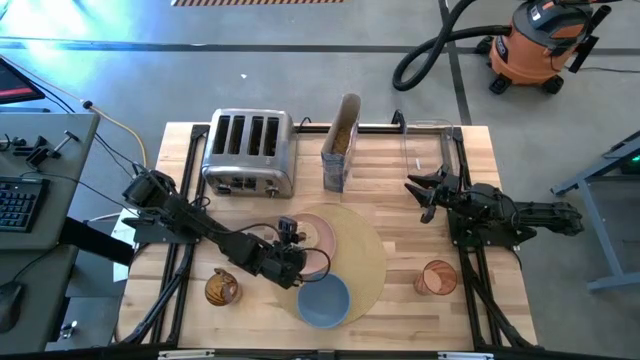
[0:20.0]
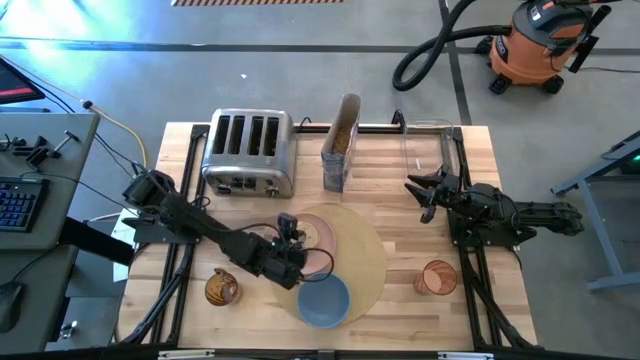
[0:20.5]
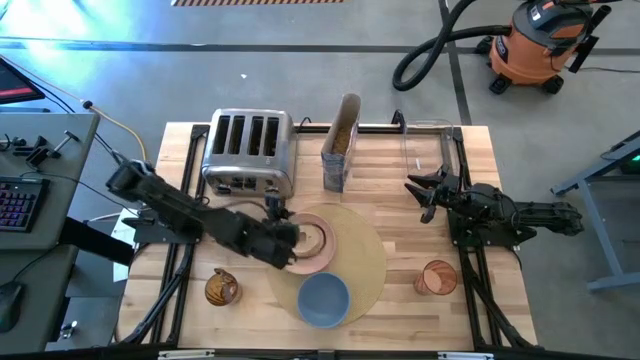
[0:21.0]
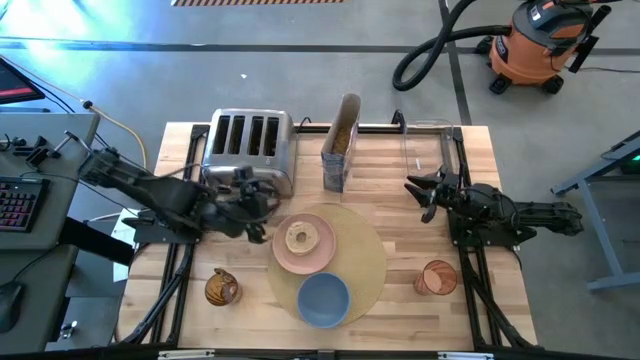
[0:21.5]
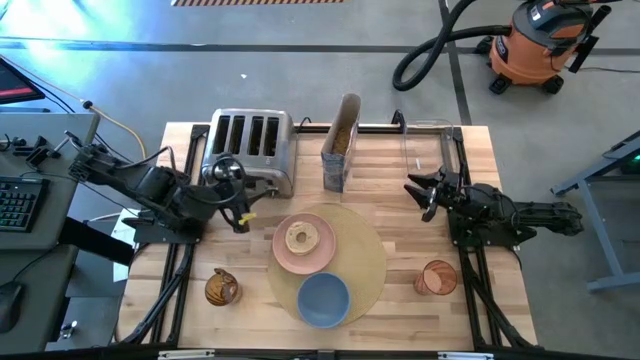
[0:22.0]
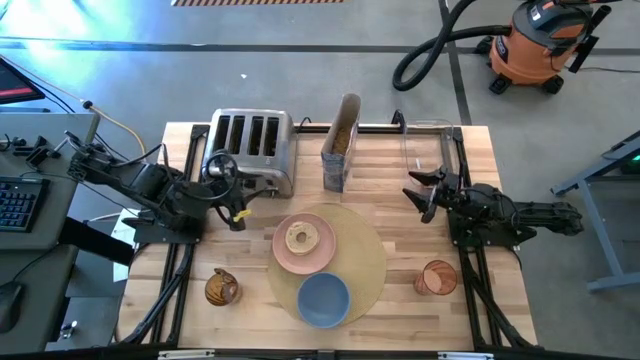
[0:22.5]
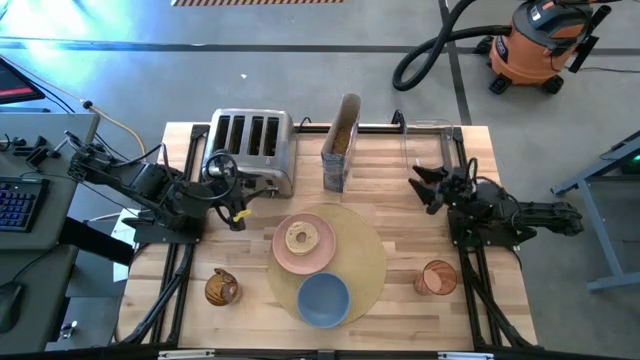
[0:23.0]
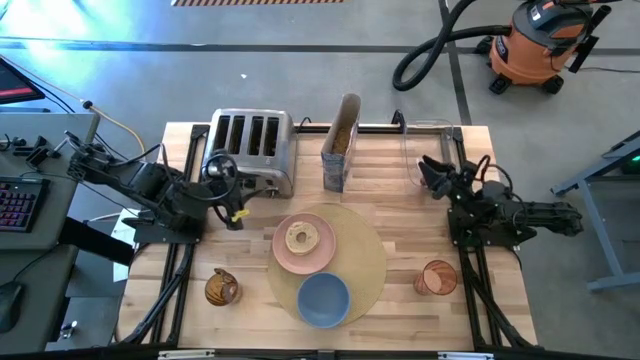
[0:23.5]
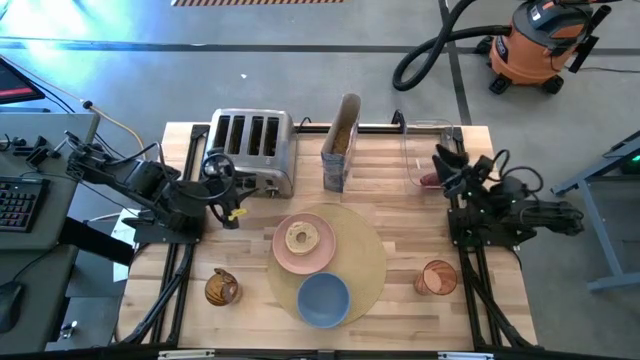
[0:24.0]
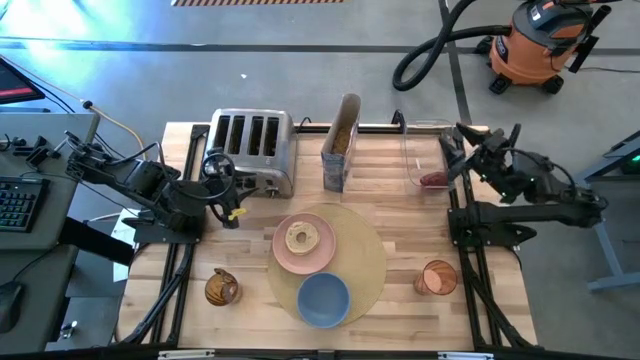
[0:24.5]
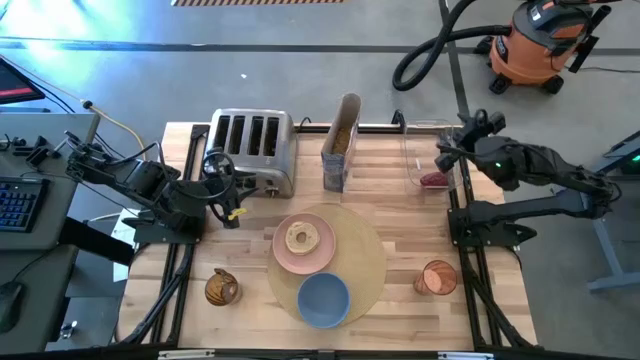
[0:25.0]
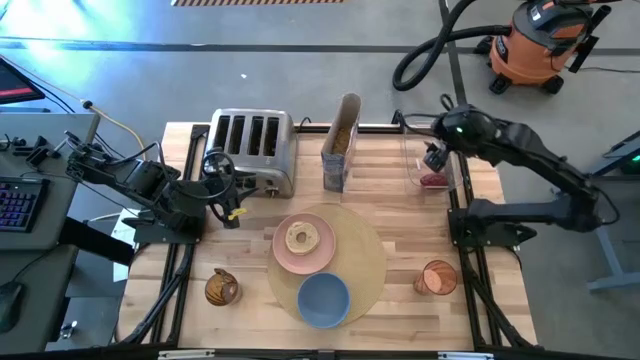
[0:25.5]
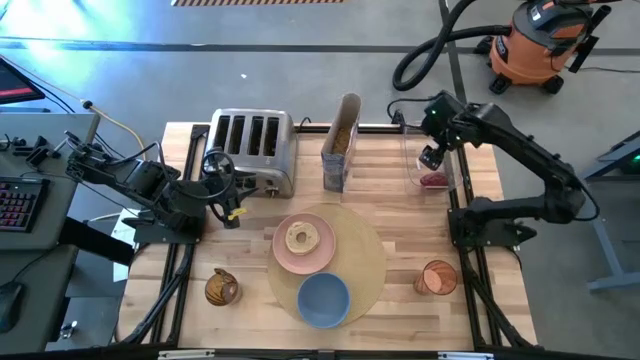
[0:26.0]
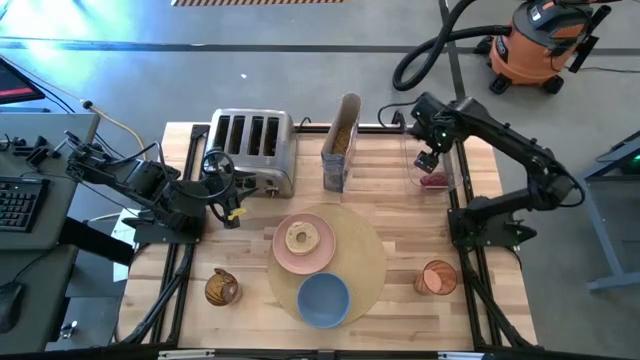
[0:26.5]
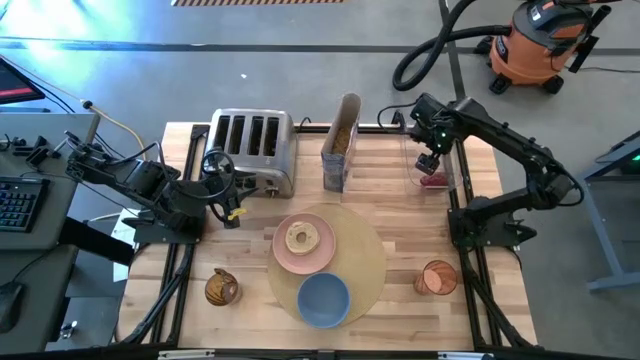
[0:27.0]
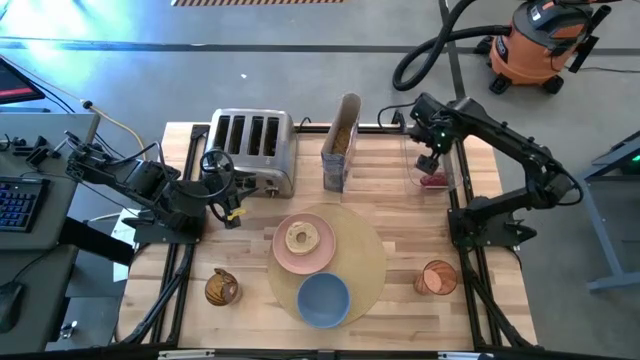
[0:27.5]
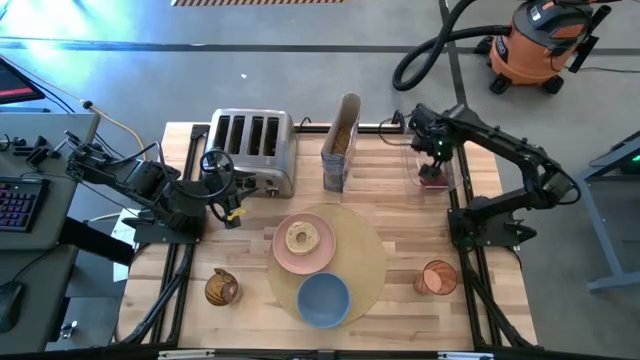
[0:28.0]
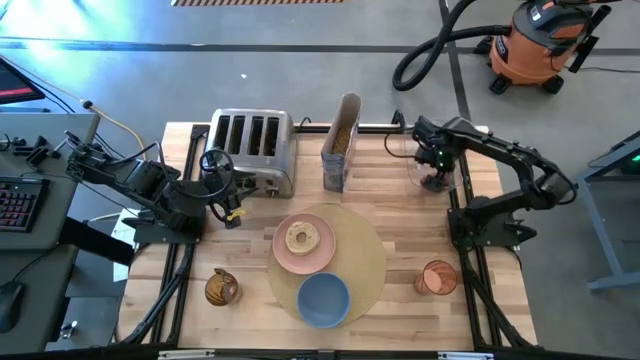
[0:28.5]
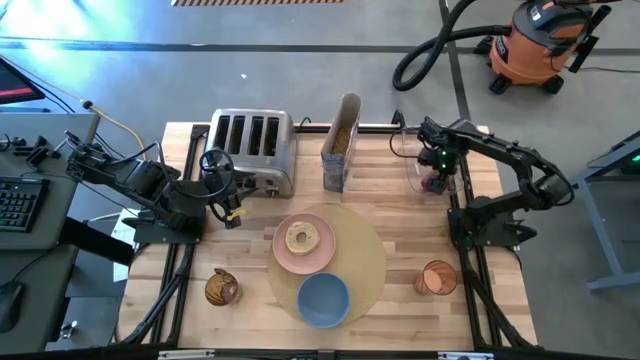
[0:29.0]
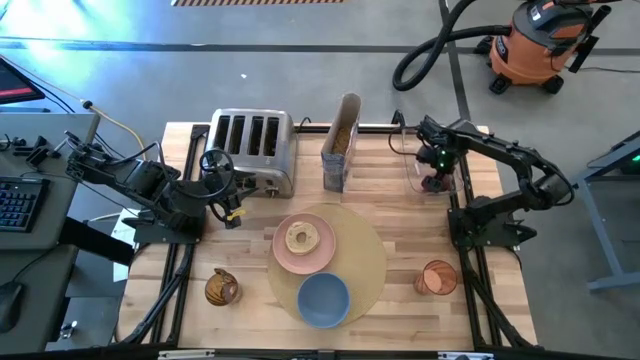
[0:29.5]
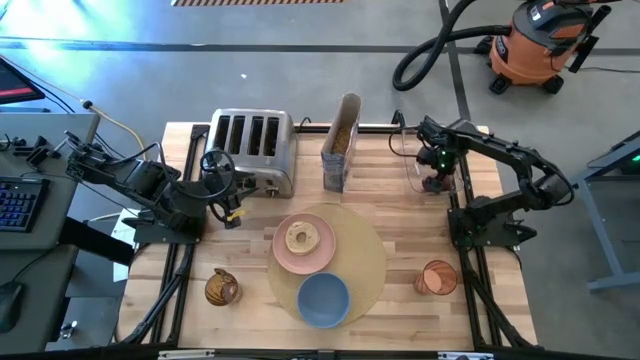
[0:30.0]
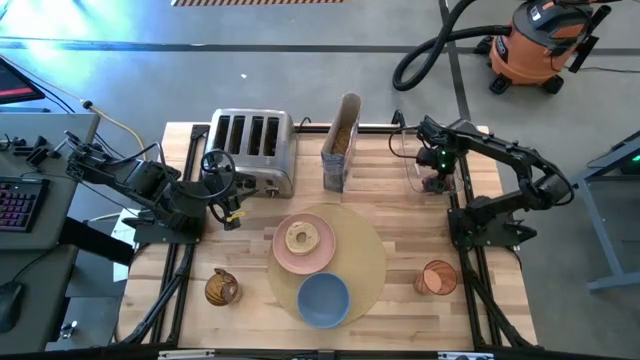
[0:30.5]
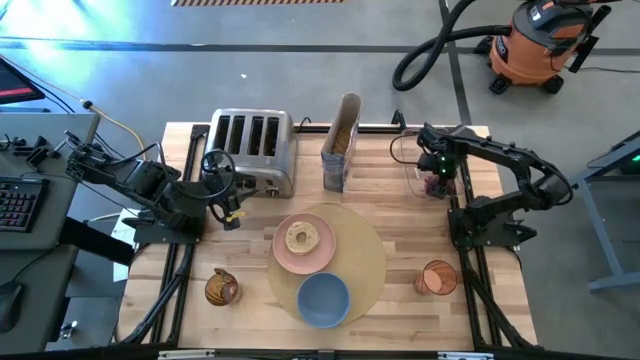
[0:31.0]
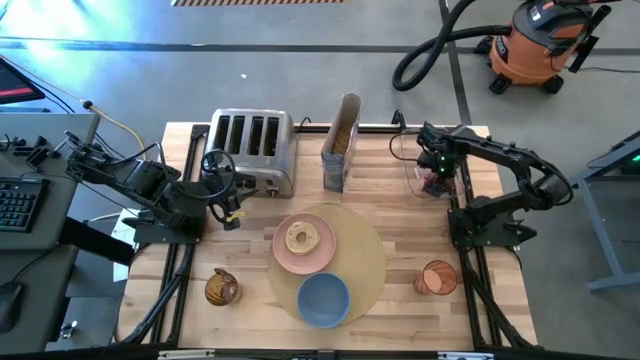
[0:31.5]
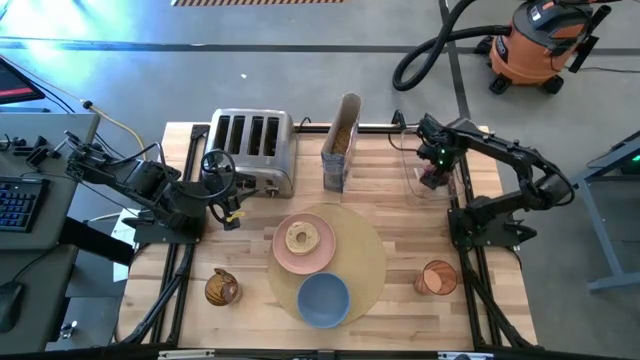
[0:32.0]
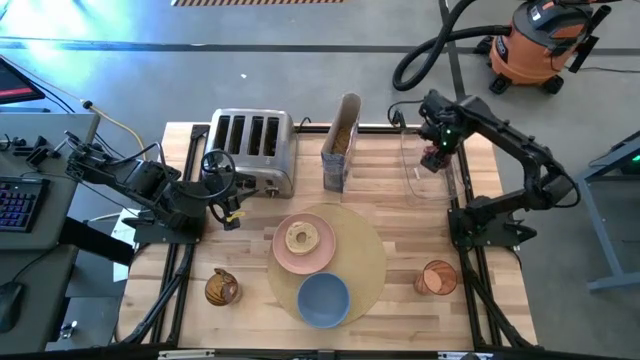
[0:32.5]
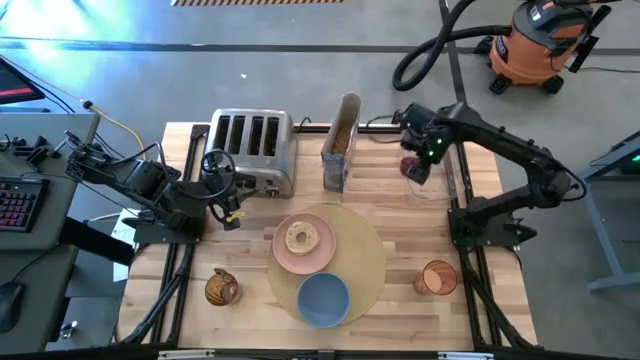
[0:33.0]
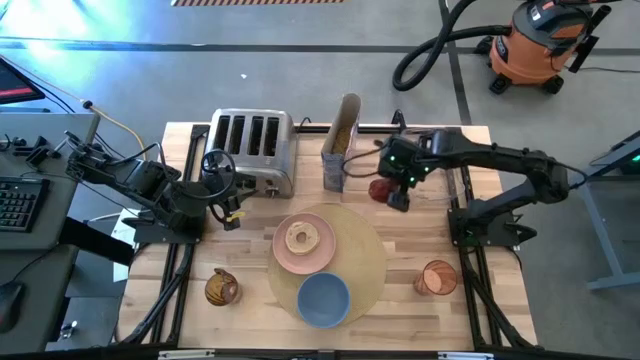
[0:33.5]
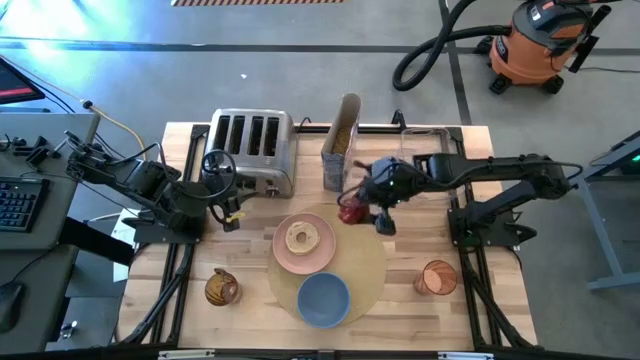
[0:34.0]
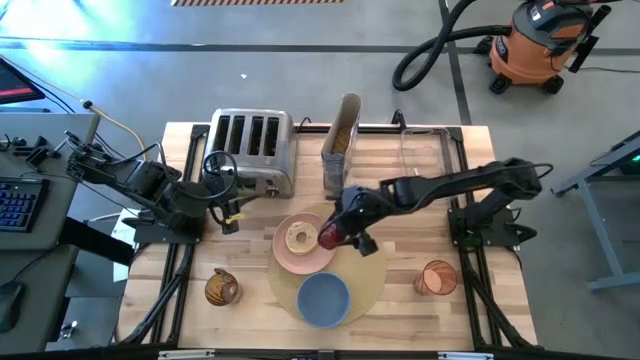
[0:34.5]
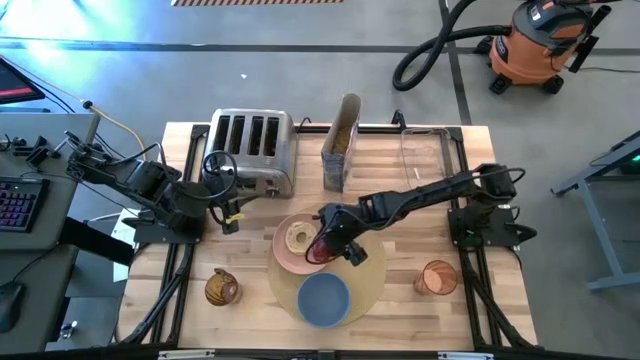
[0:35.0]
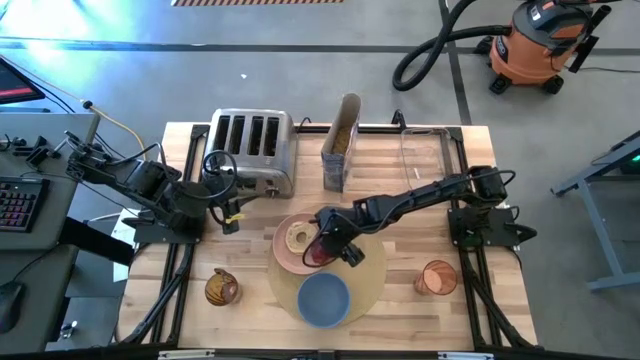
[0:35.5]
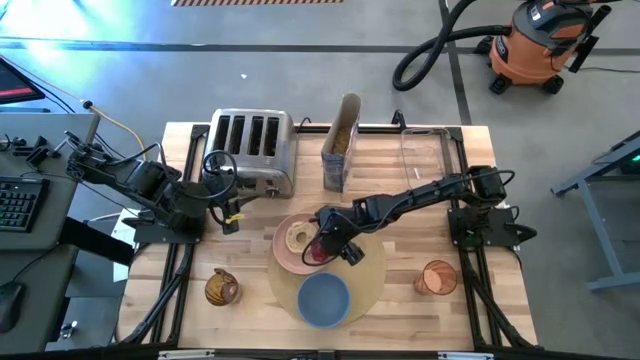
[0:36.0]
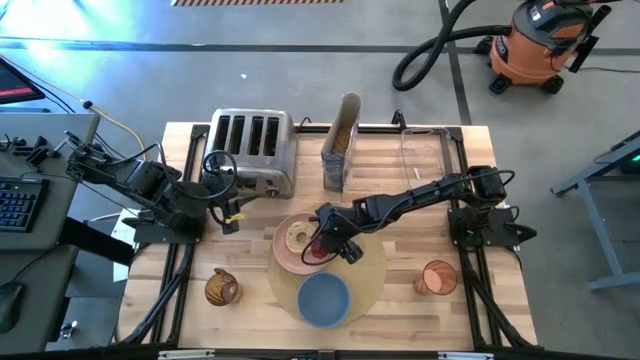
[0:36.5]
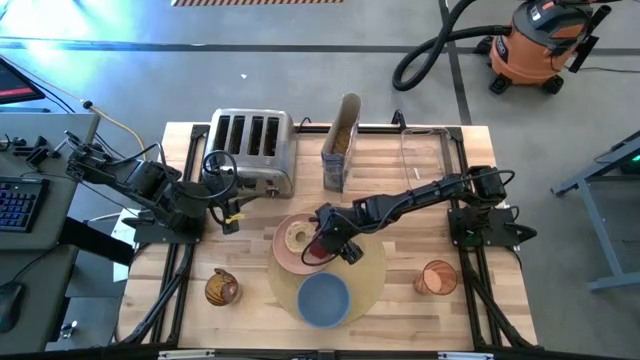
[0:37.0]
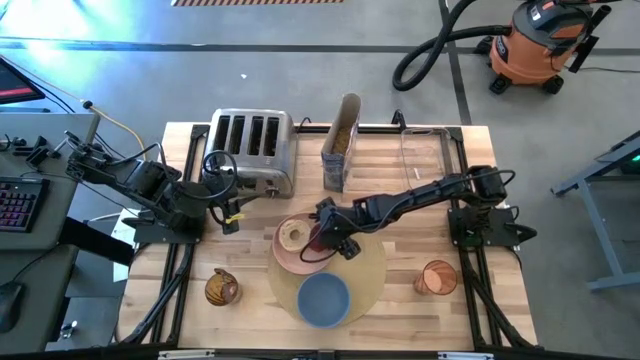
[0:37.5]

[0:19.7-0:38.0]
Task: Arrange a breakfast setting
Put the red apple on the pink plate to the right of the toasted bagel

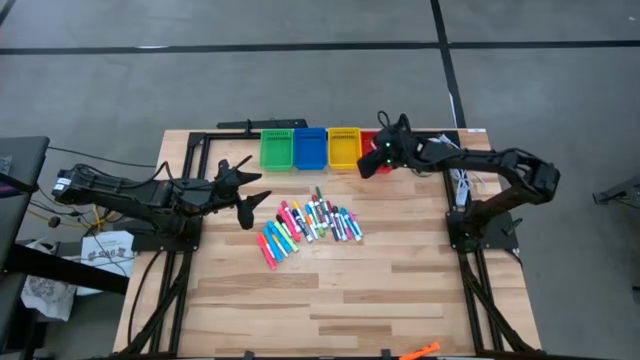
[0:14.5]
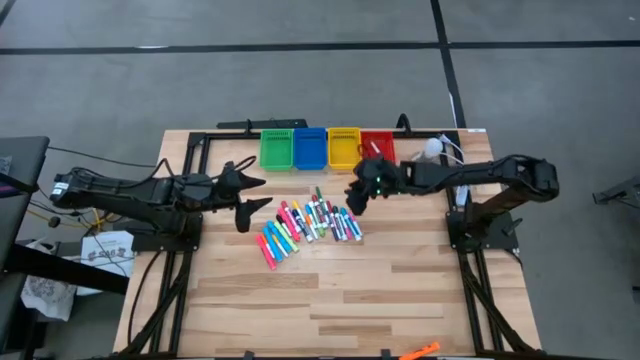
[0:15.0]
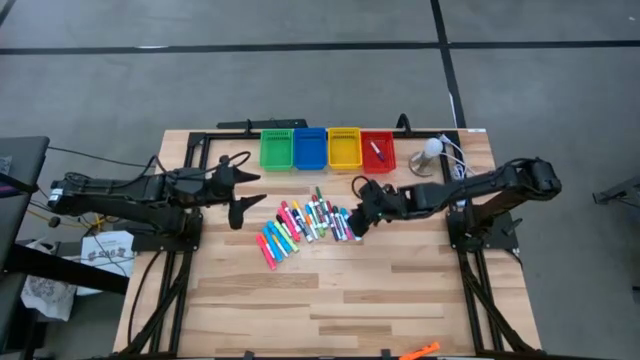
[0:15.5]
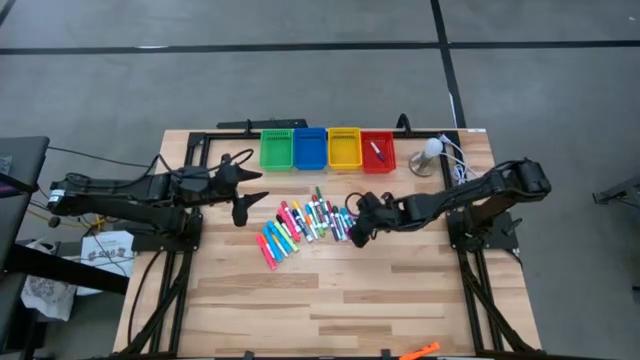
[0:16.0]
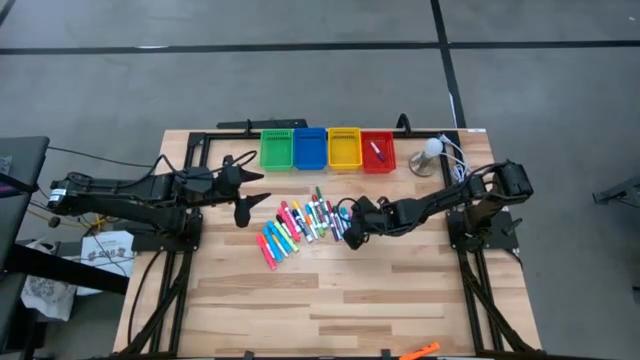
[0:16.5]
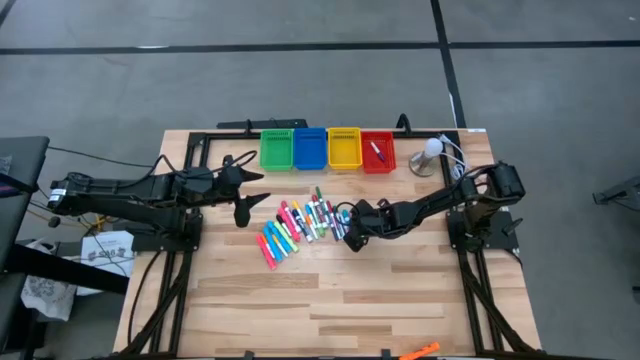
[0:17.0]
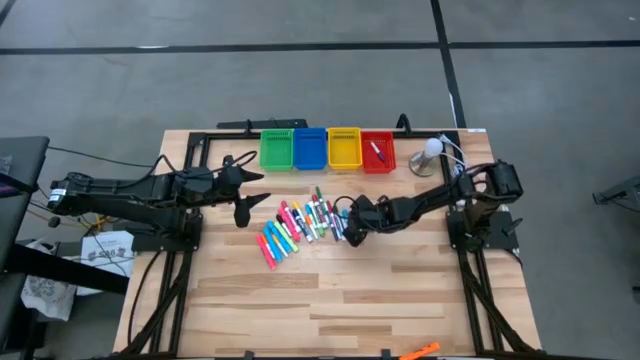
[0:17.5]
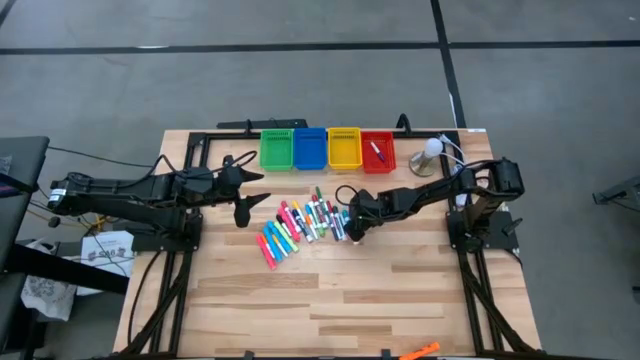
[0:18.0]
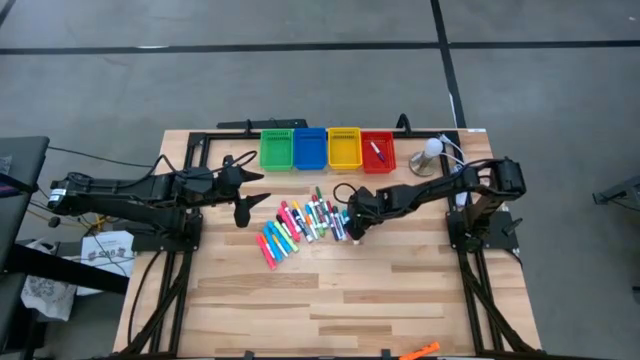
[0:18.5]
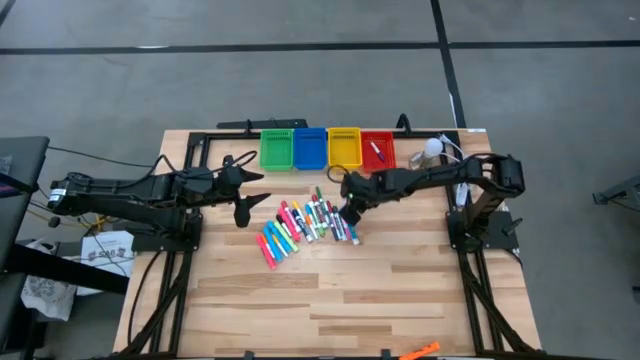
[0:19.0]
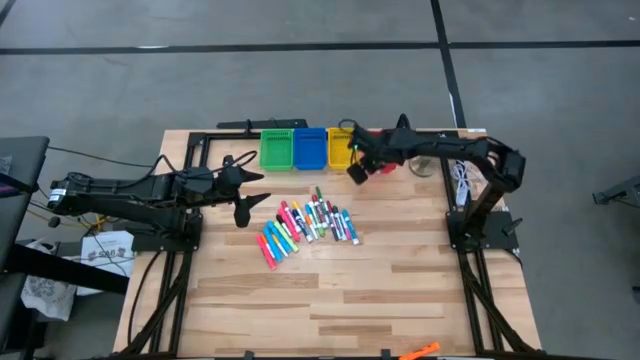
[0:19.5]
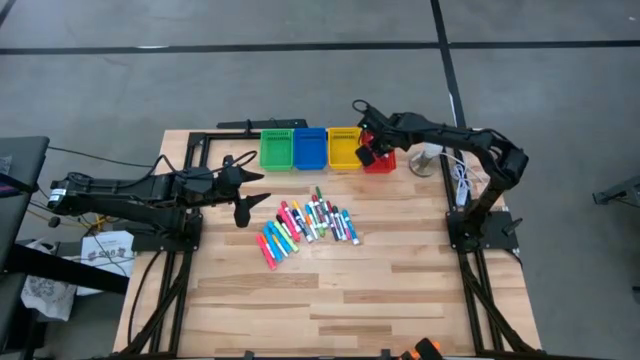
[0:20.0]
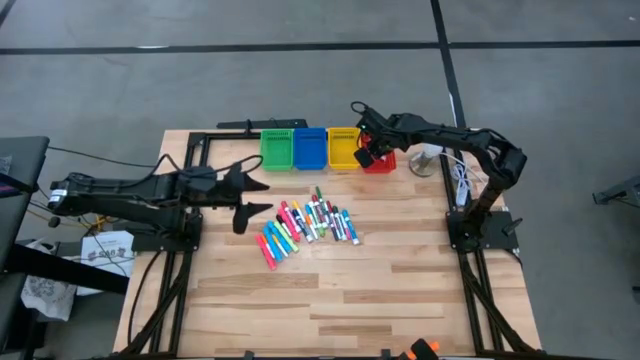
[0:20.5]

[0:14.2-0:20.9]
Task: Pick & Place Markers
Put the right pink mini marker into the red basket
